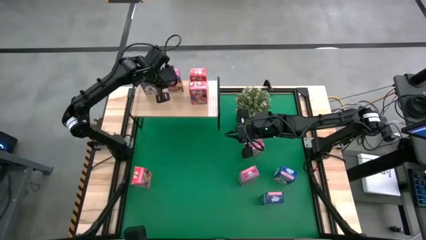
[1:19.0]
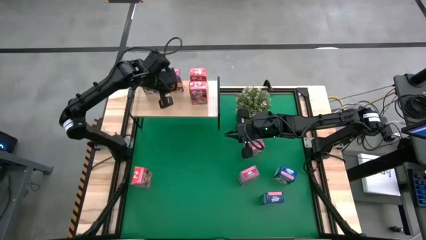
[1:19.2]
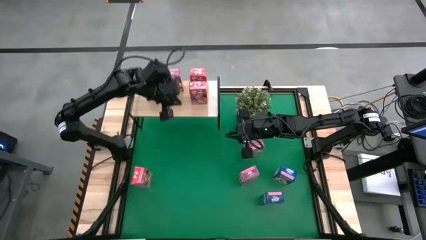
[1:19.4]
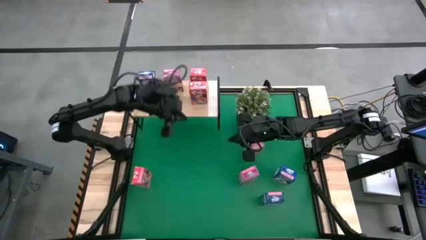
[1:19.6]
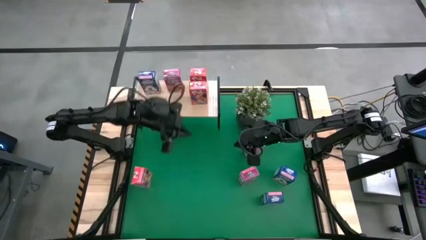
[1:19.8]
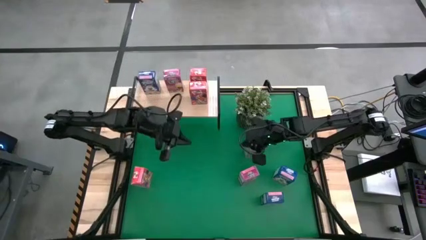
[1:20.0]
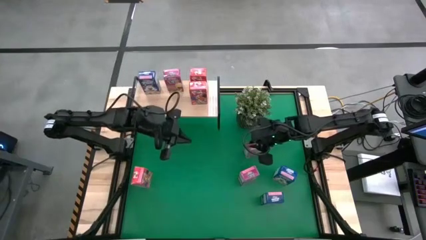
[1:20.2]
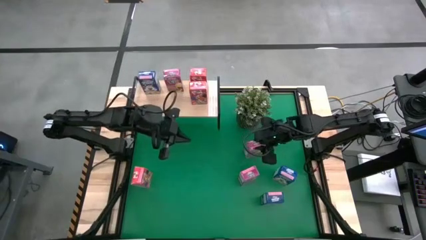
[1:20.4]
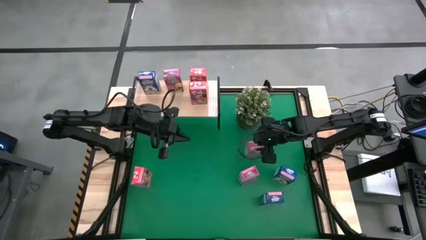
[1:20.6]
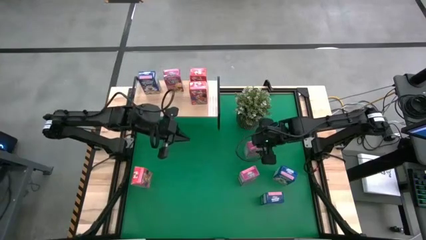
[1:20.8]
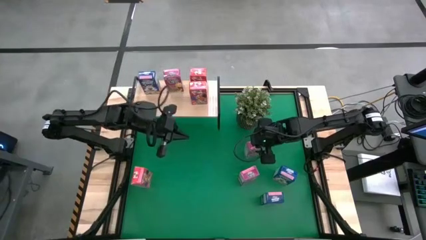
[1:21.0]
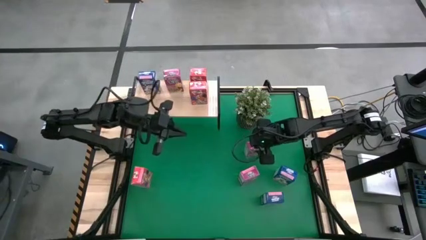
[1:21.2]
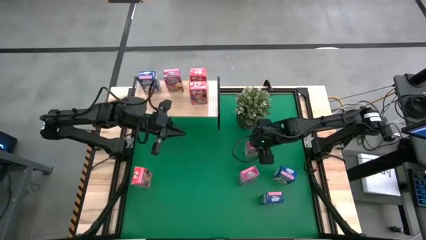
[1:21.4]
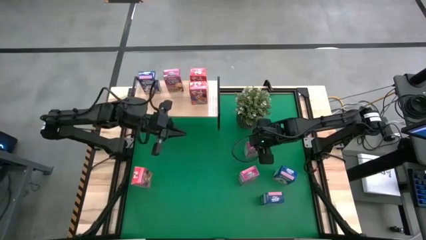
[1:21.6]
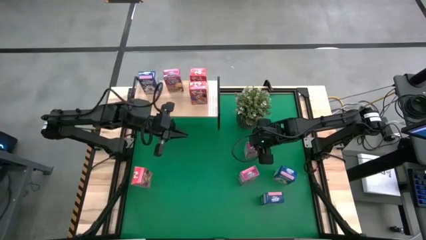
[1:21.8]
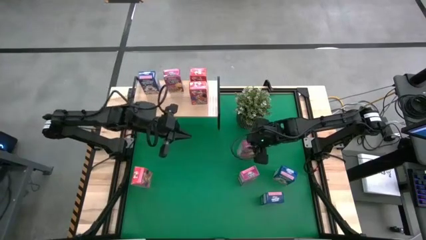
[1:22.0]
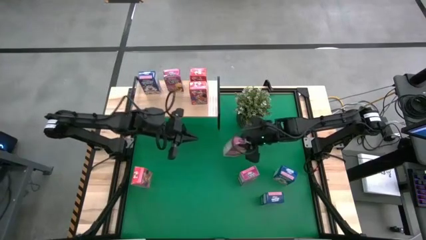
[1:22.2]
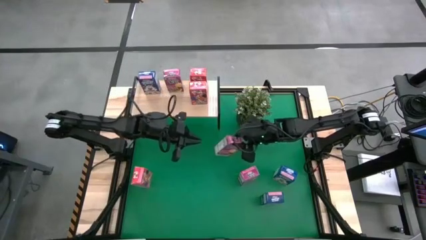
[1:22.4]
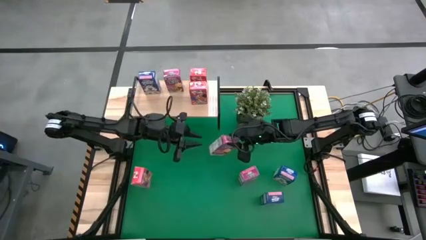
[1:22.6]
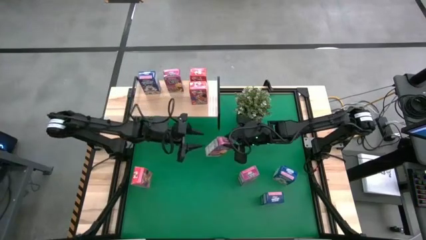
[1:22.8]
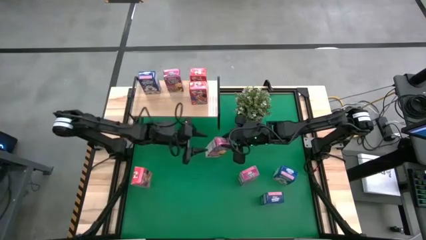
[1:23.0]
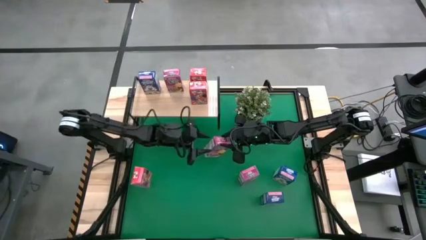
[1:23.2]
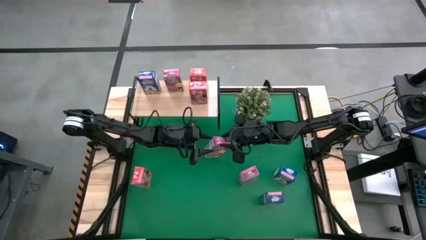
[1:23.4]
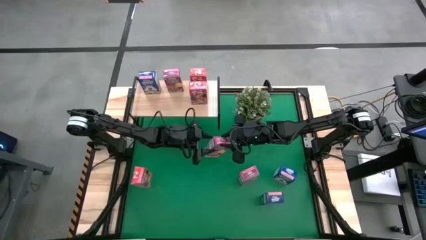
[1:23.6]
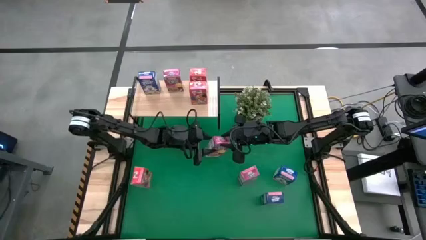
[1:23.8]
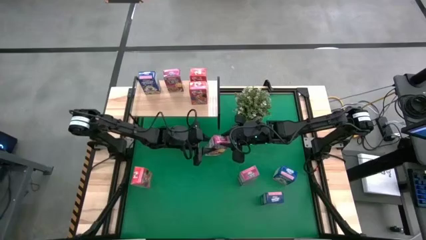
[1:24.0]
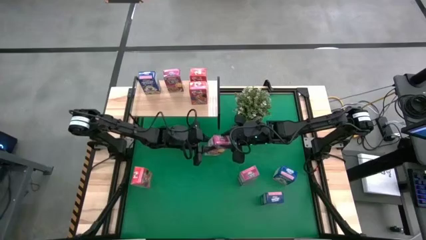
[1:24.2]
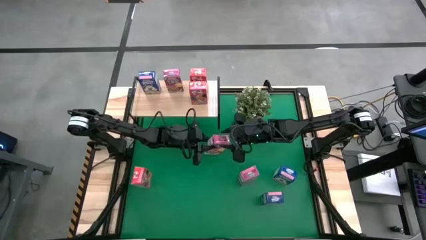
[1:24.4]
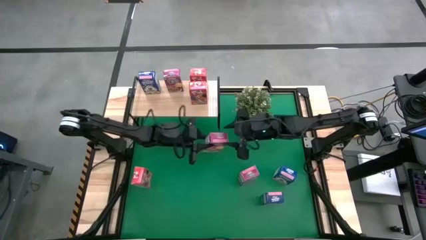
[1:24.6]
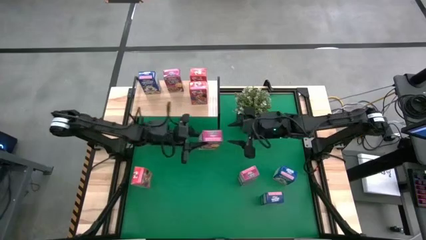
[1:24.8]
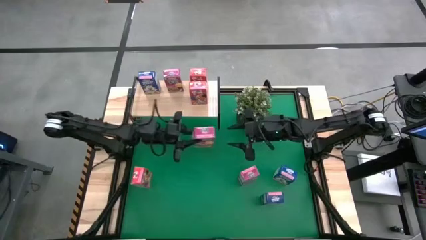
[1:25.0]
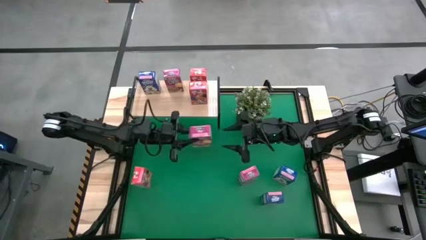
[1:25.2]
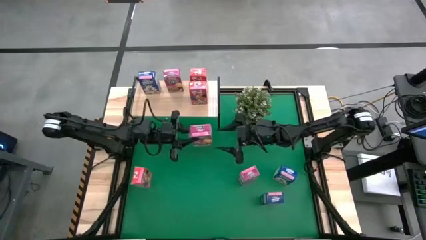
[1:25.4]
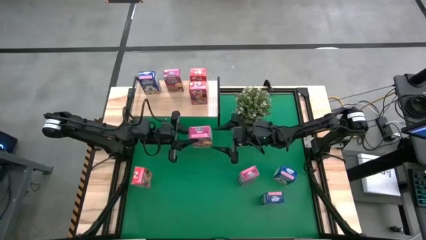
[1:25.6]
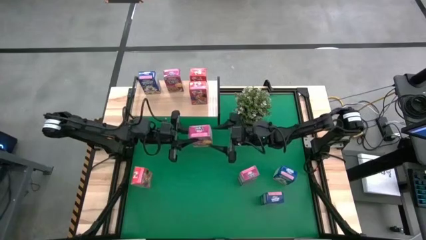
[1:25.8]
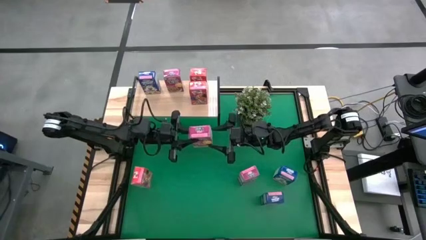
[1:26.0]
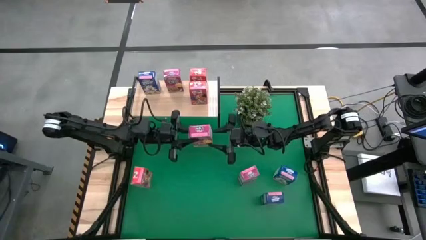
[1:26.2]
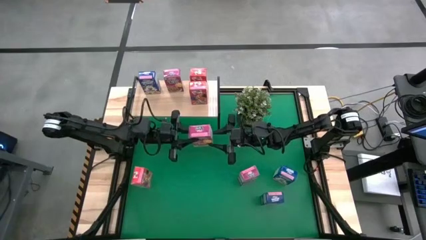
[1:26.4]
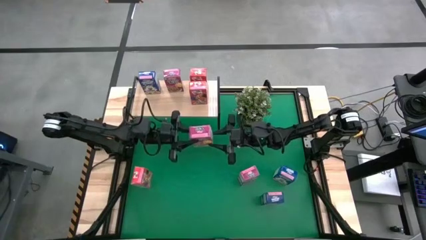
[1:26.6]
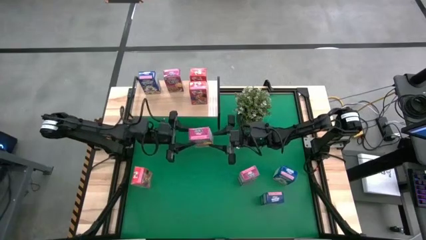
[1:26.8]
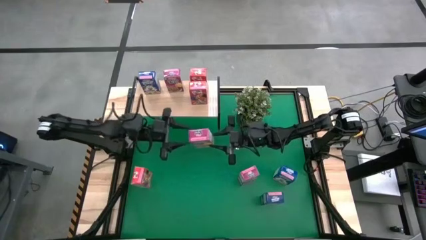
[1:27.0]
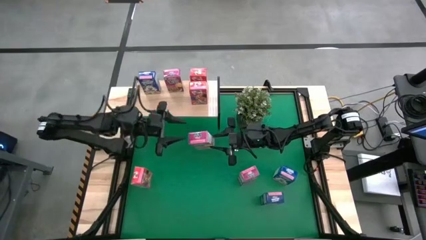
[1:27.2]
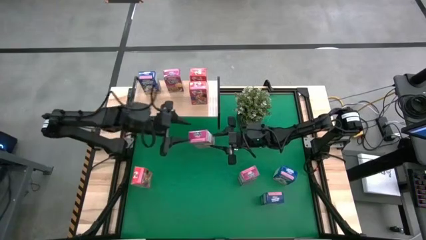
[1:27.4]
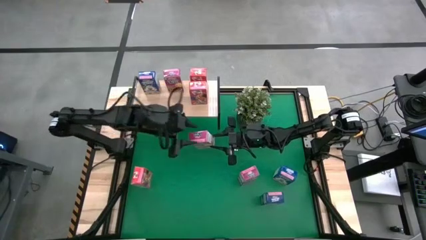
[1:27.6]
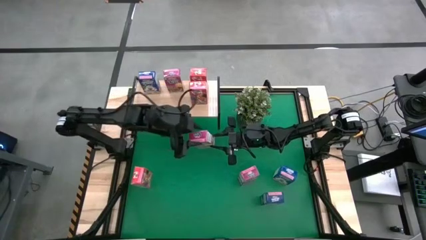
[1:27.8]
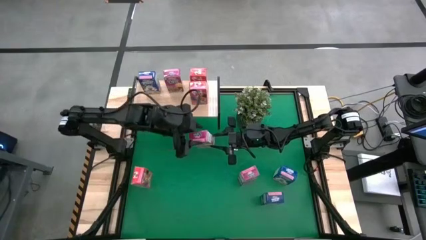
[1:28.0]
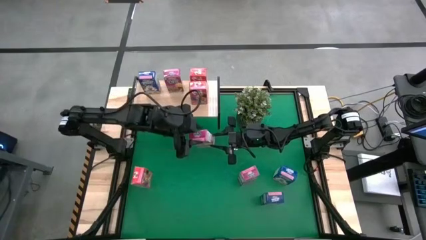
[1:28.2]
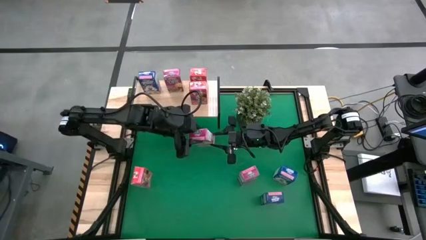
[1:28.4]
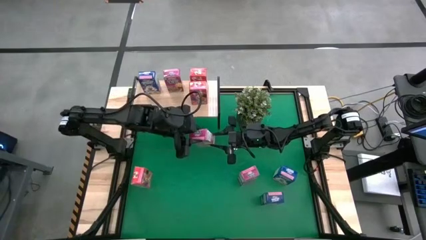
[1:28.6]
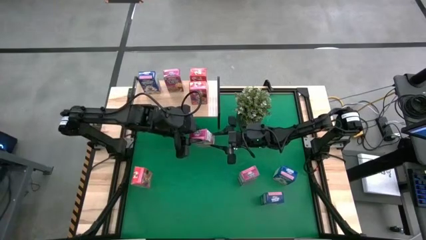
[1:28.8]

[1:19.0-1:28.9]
Task: Stack cereal on shelf
Put the top pink cereal box on the shelf

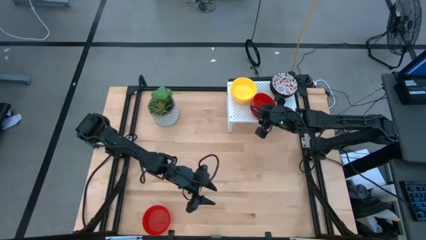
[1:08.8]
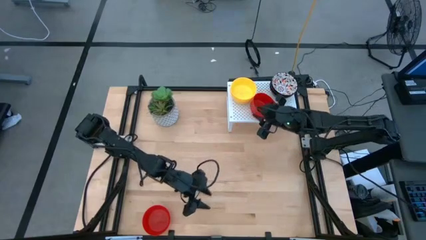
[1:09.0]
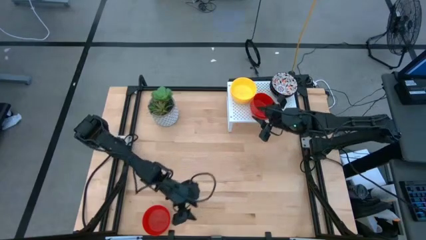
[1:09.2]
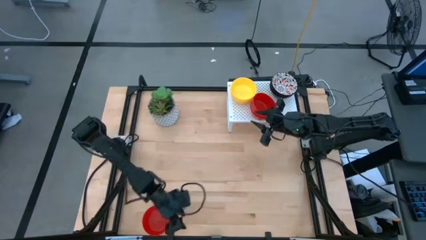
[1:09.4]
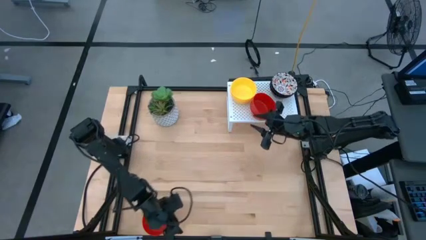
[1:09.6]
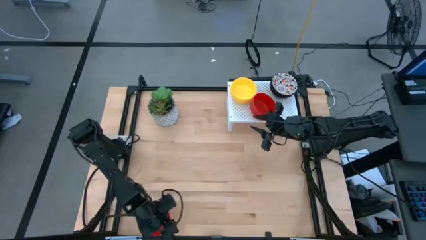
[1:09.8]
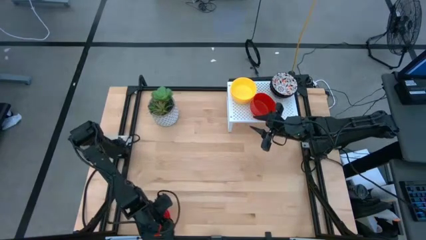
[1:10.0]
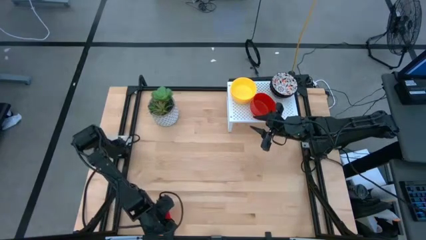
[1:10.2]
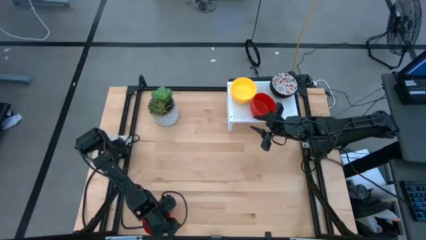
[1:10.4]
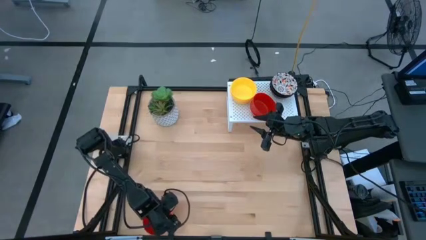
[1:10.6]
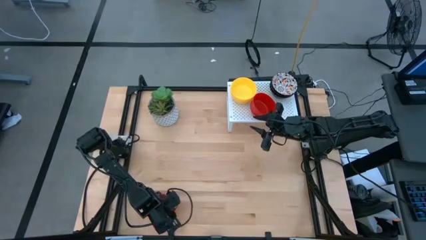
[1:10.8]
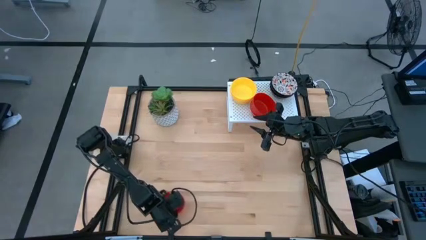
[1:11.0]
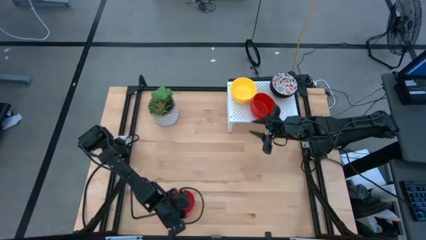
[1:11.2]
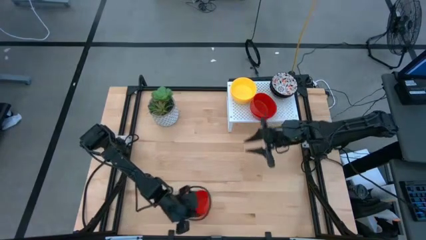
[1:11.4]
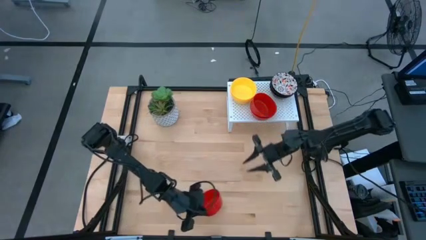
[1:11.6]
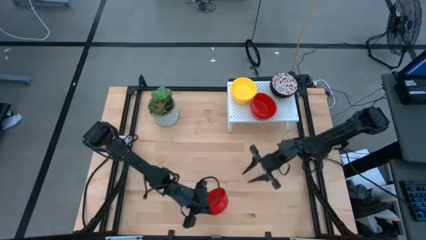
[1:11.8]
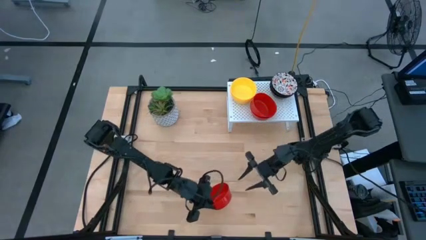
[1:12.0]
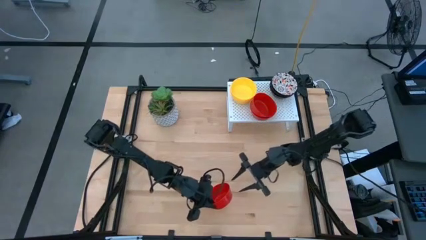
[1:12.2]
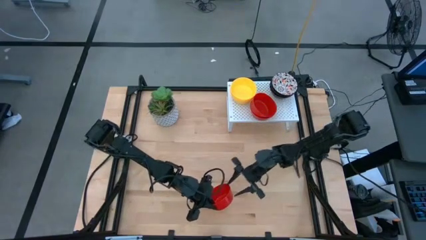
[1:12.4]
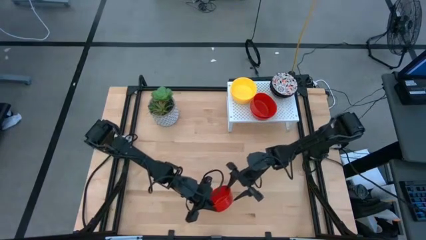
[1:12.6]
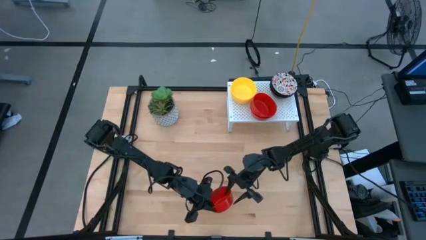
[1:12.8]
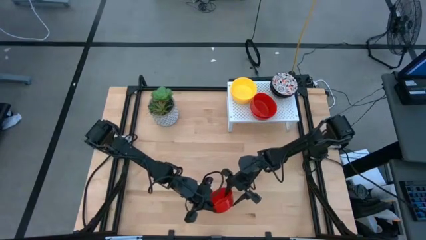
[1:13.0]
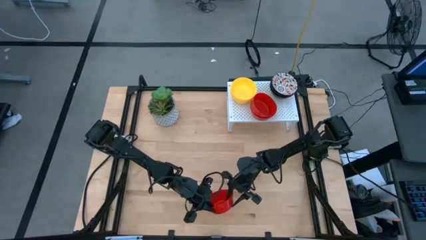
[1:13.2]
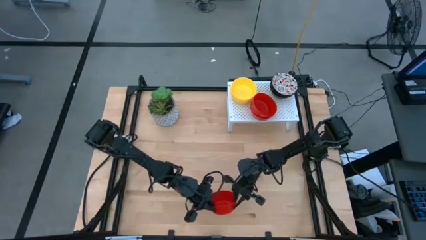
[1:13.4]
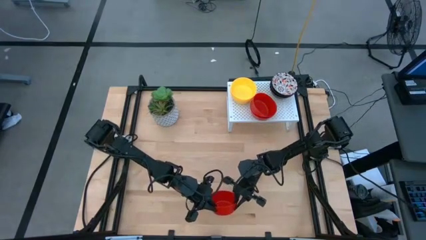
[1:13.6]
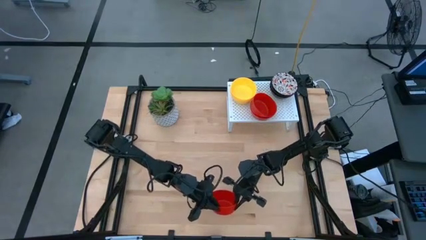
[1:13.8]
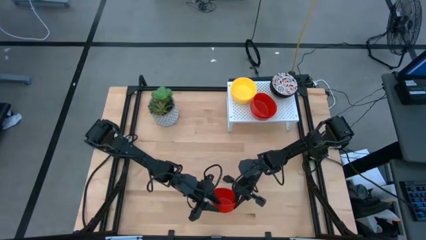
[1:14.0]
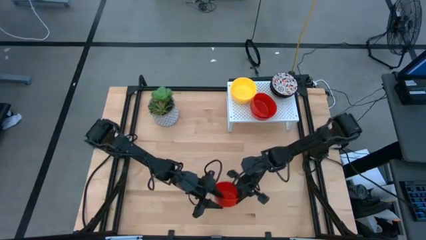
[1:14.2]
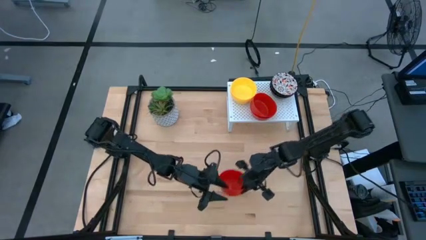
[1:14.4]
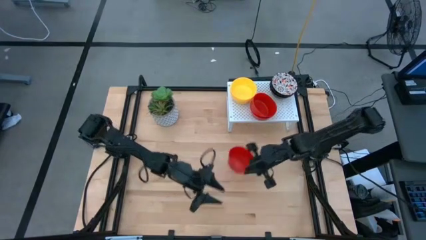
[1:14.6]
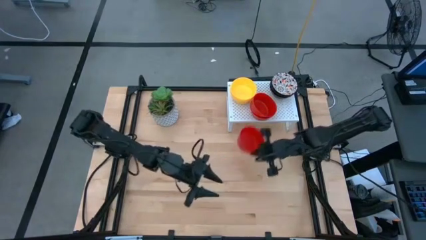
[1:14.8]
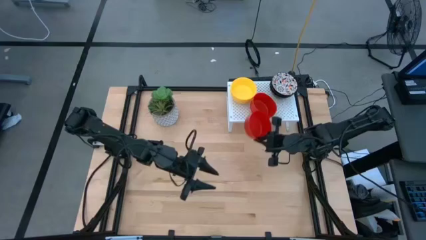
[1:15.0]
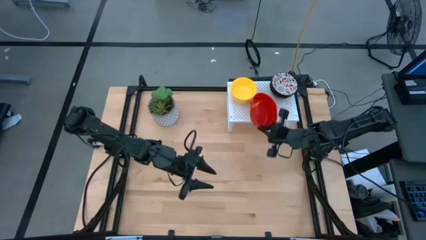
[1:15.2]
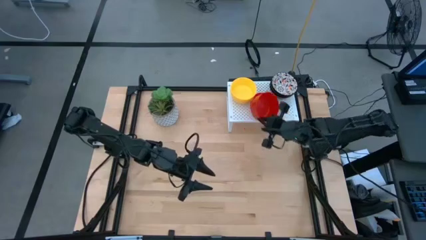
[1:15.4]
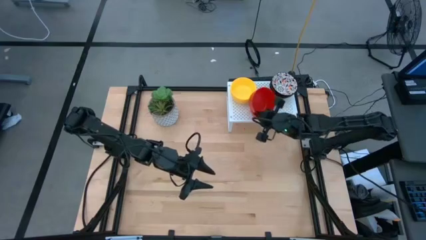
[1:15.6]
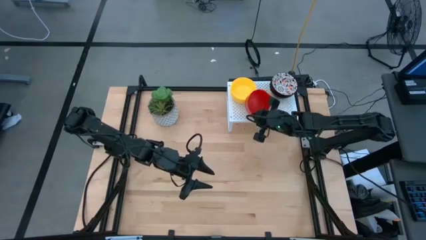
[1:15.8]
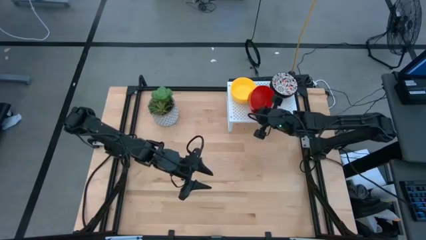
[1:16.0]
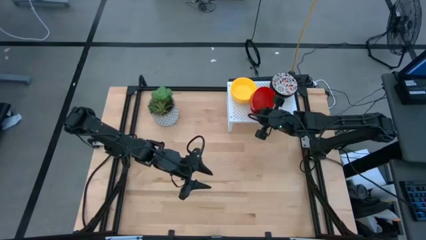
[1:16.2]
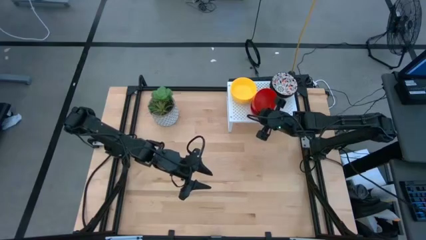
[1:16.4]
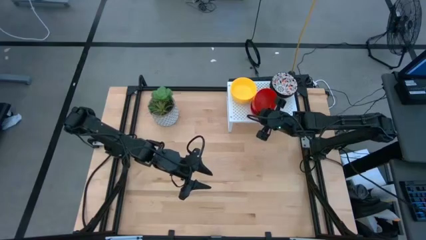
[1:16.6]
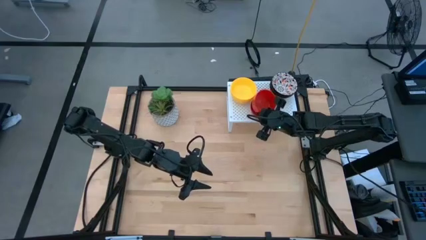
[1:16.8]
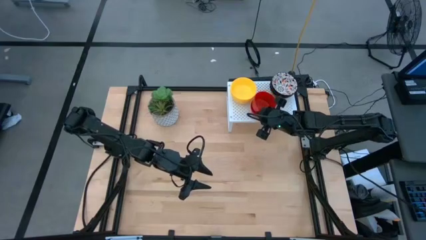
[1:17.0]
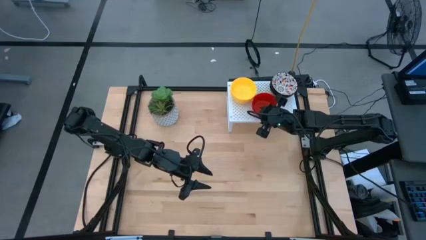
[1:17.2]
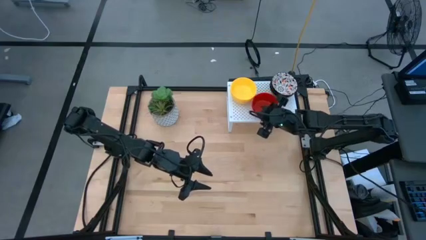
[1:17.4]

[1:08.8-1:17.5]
Task: Pick & Place Mini bowls
Stack the red bowl on top of the red bowl on the shelf
